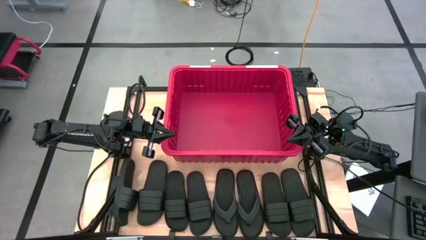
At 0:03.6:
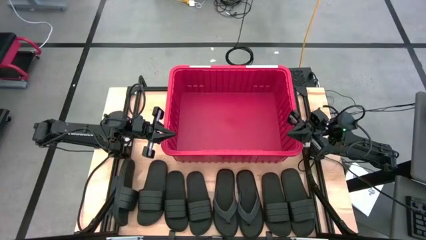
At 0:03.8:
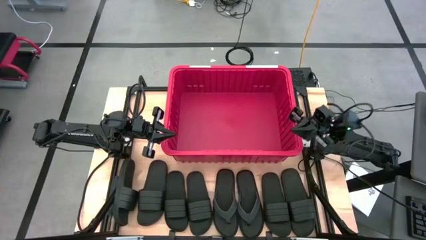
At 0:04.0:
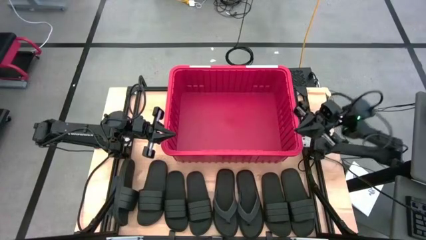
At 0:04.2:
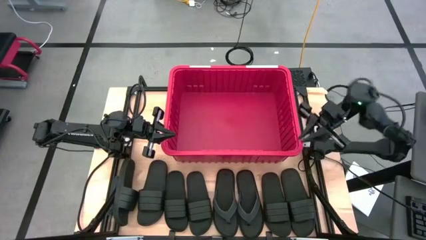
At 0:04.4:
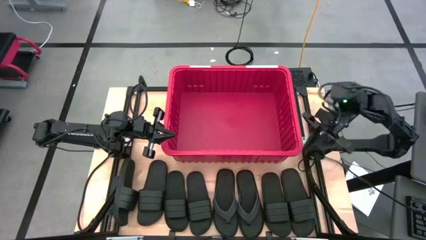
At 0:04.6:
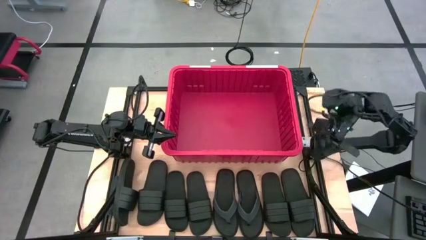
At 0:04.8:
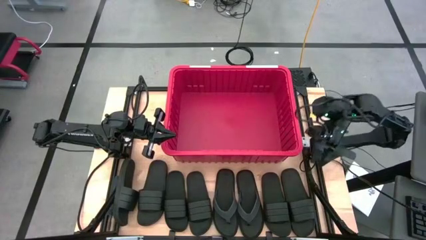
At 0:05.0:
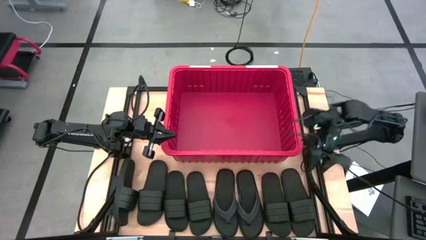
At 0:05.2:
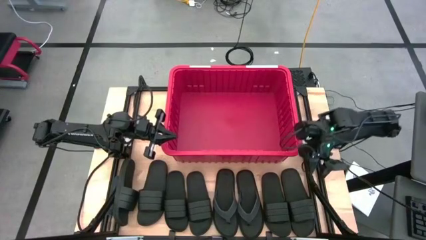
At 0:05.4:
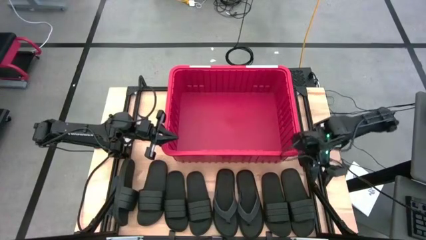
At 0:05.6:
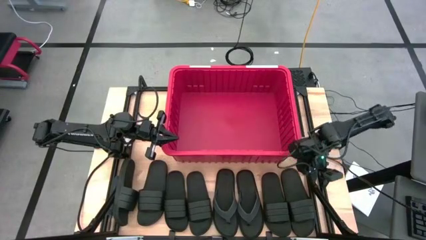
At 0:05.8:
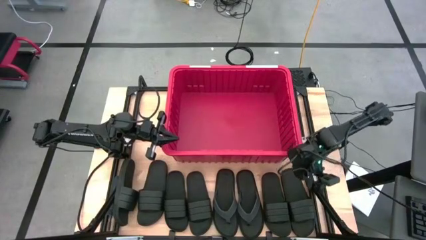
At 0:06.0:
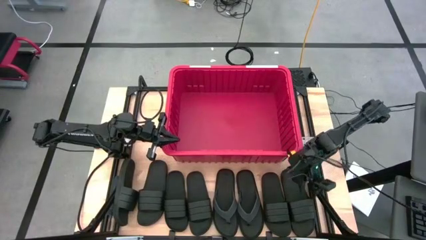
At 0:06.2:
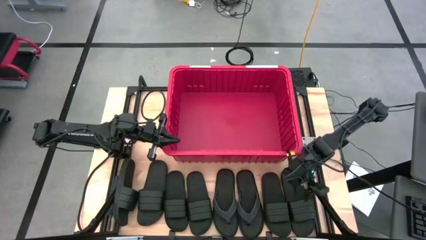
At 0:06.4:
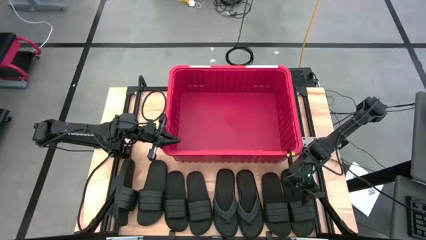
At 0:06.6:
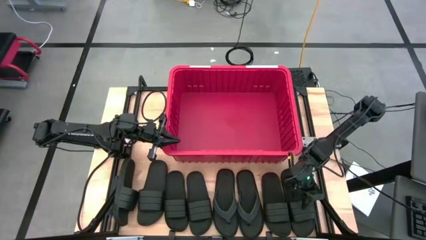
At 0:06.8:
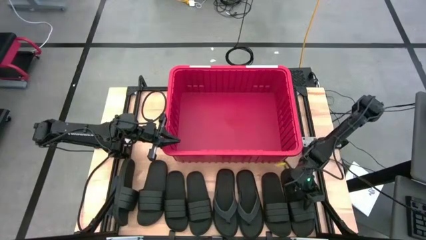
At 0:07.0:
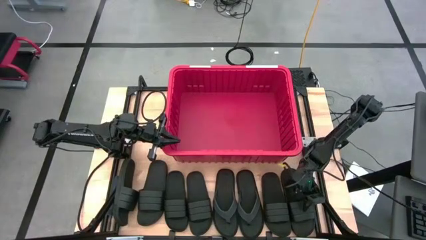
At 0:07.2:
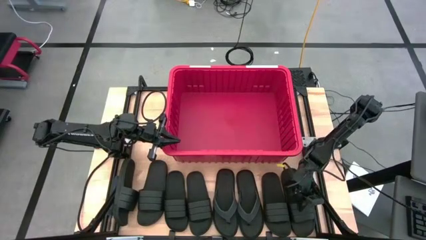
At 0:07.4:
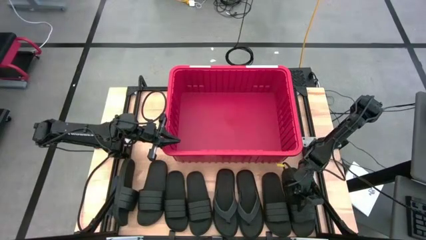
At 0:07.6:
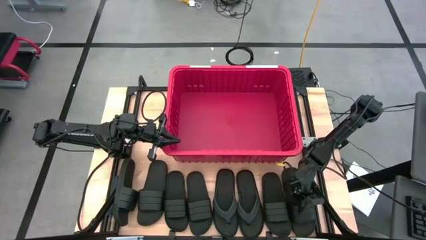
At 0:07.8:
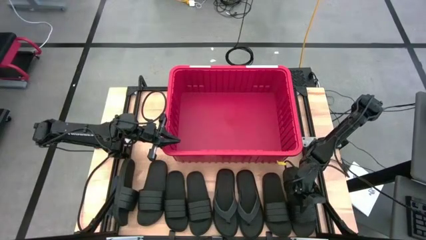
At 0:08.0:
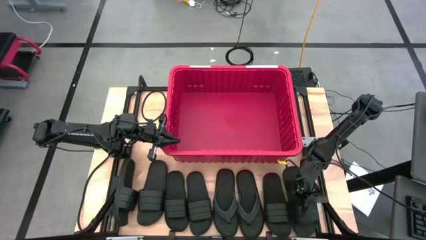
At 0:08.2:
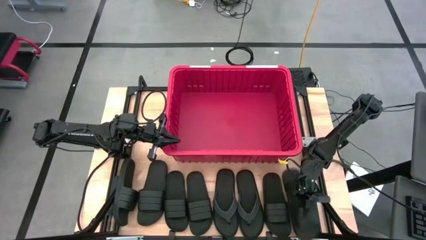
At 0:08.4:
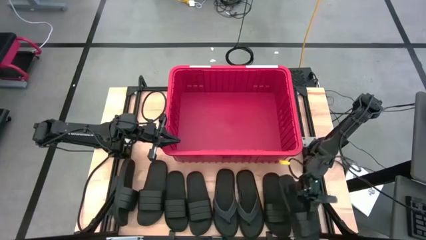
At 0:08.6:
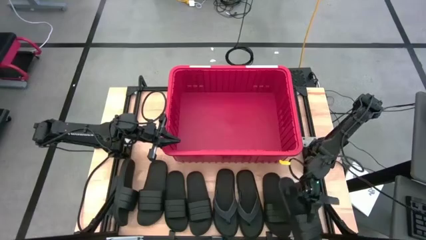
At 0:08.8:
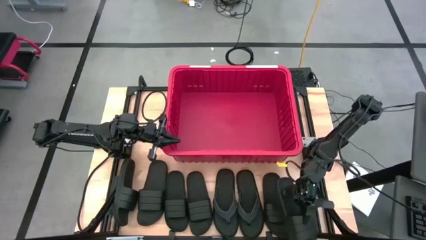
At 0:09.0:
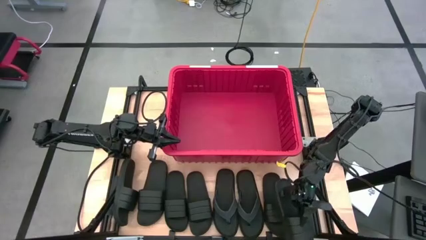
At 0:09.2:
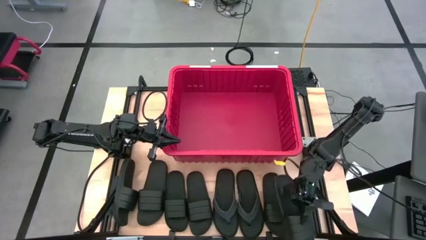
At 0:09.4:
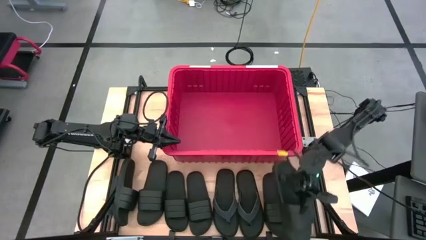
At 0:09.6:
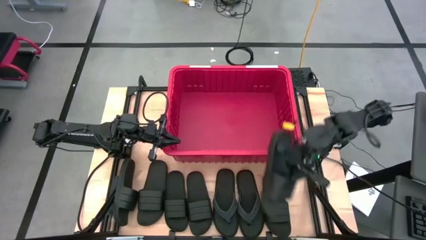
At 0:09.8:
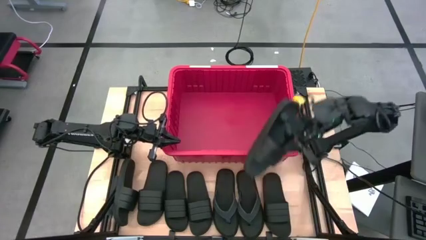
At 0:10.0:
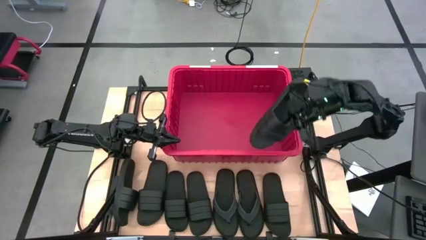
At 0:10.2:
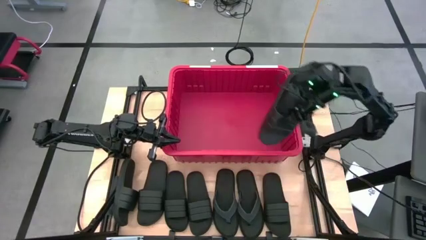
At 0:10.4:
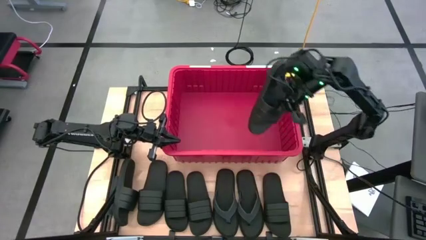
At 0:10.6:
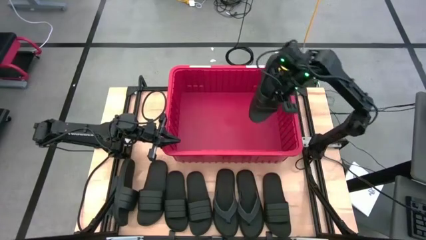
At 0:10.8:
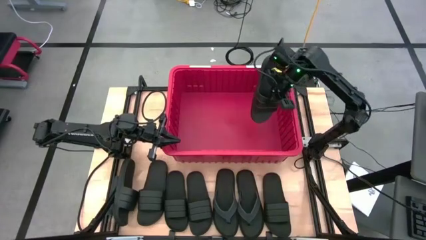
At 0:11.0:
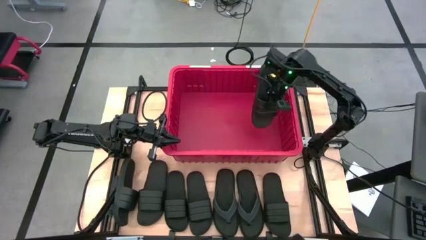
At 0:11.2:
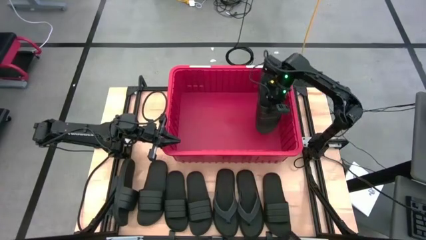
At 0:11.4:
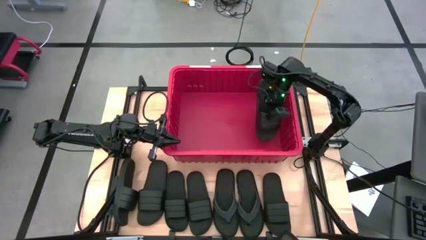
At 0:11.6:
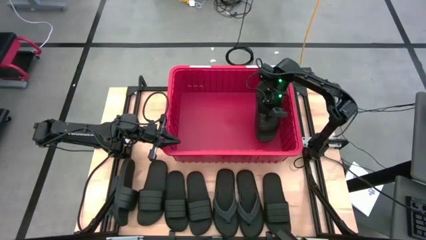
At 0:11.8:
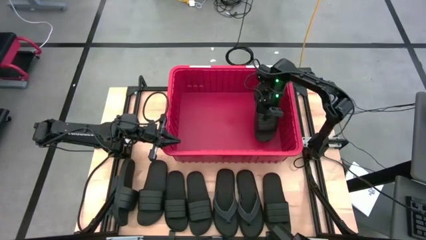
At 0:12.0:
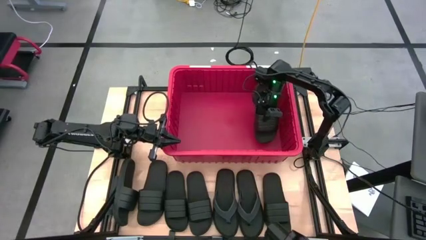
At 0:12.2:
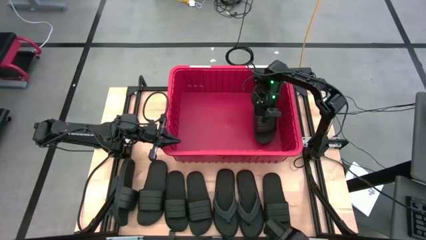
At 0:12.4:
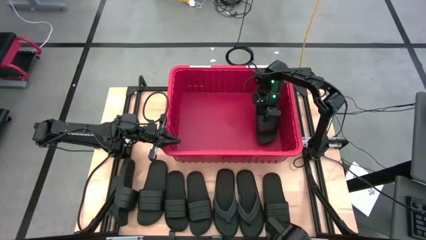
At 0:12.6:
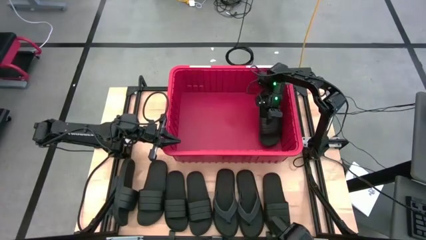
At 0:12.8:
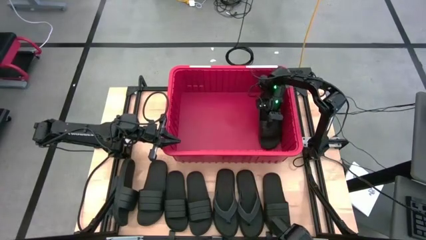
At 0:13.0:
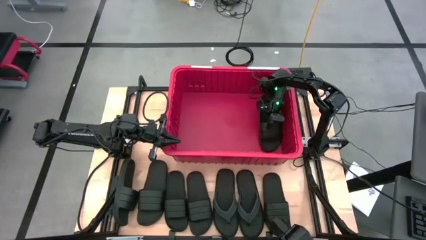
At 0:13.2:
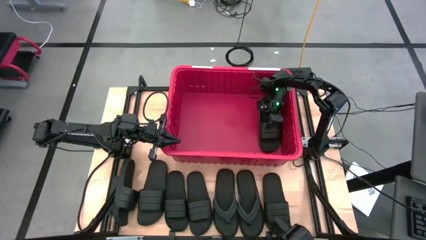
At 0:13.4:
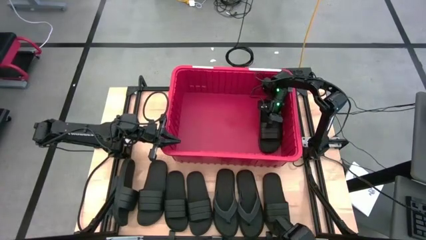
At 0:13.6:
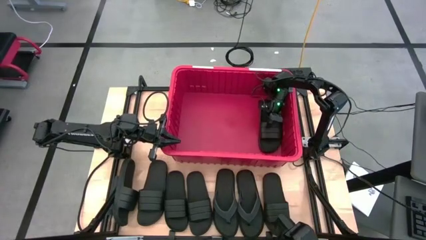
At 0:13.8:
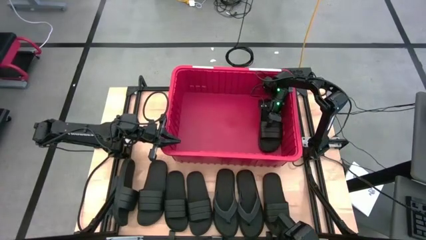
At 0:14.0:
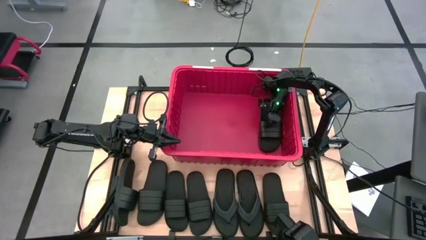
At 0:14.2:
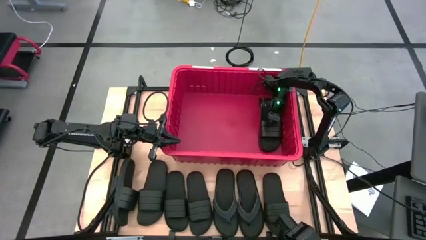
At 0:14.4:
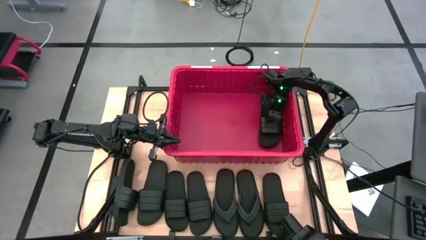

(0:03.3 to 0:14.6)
Task: Pick and place slides into bin
Put the black slide into the red bin
